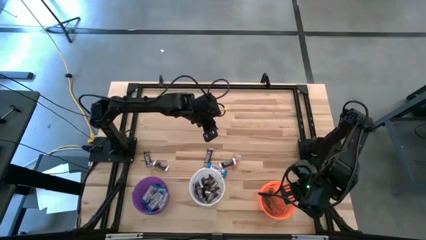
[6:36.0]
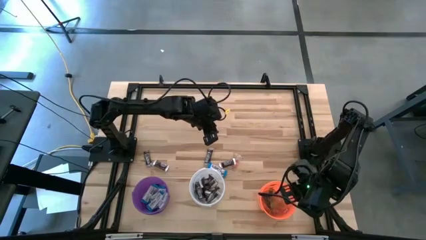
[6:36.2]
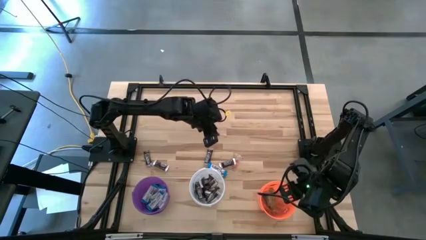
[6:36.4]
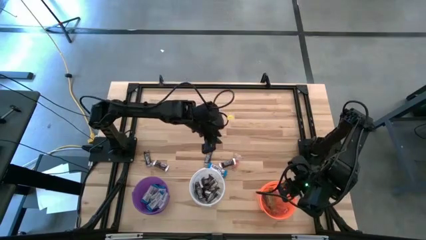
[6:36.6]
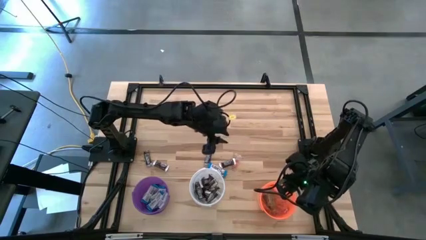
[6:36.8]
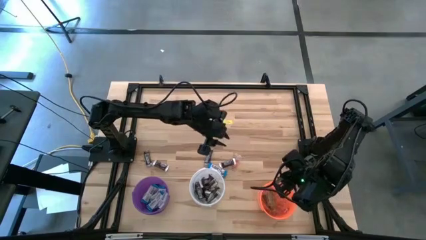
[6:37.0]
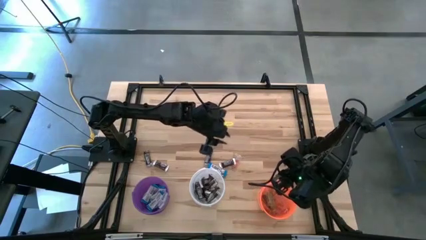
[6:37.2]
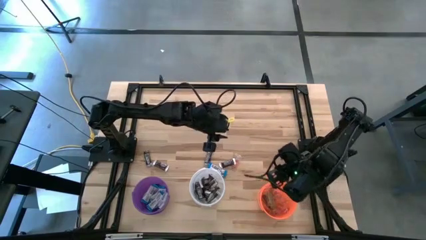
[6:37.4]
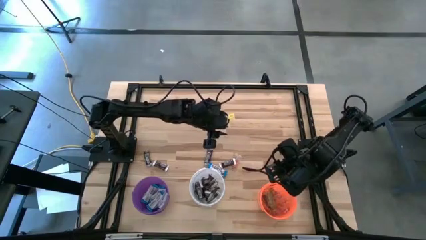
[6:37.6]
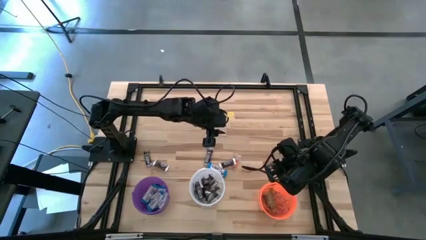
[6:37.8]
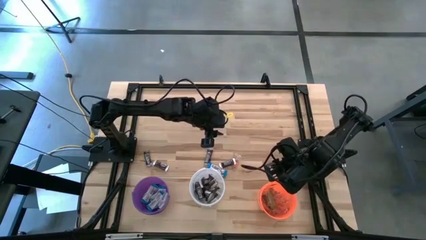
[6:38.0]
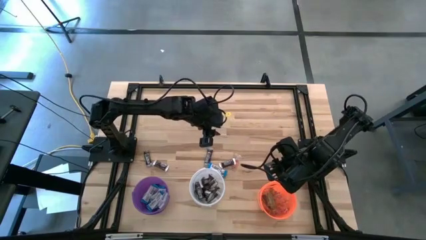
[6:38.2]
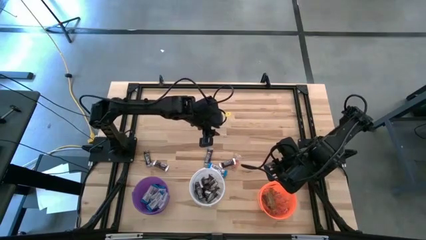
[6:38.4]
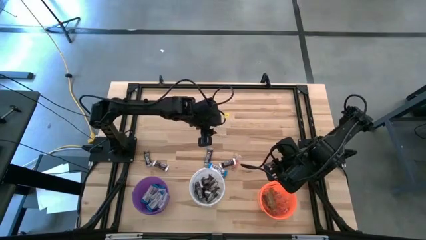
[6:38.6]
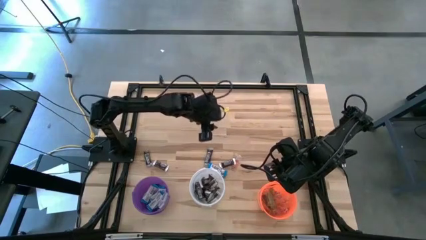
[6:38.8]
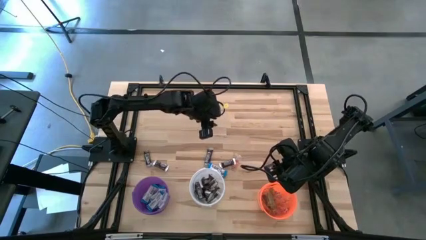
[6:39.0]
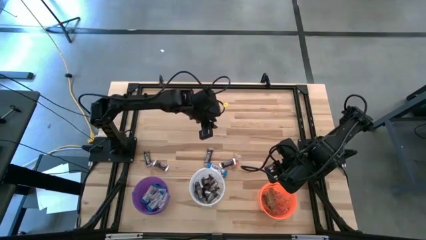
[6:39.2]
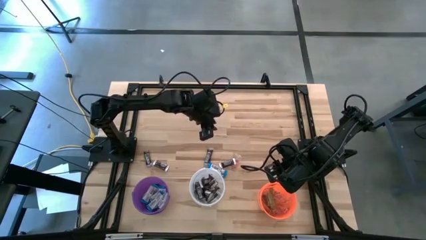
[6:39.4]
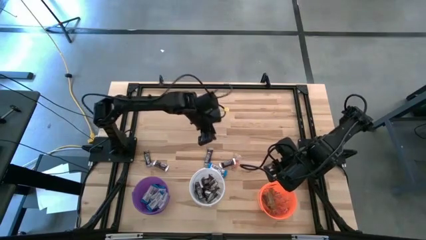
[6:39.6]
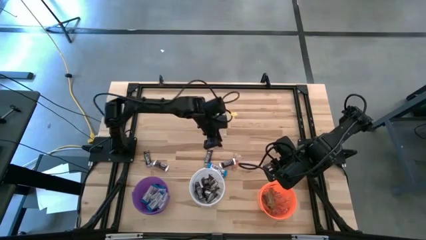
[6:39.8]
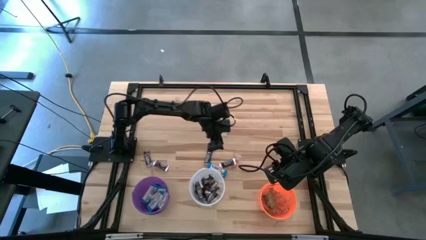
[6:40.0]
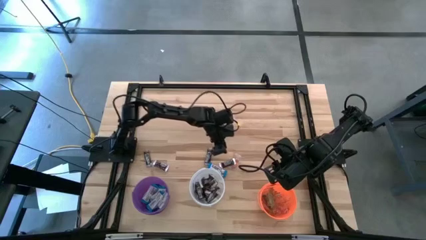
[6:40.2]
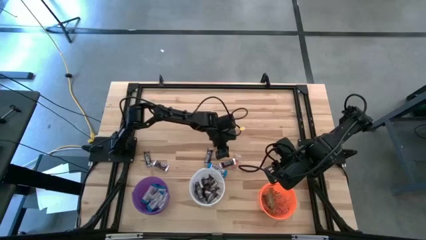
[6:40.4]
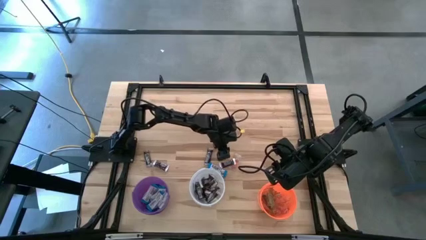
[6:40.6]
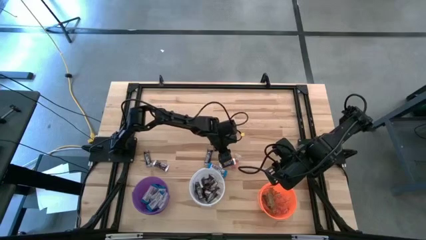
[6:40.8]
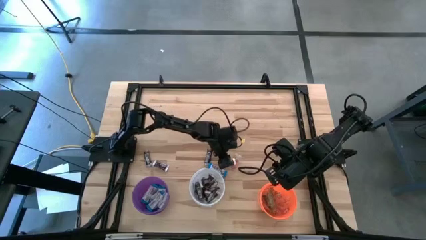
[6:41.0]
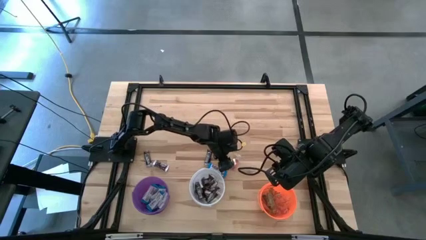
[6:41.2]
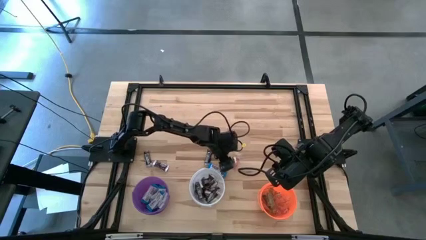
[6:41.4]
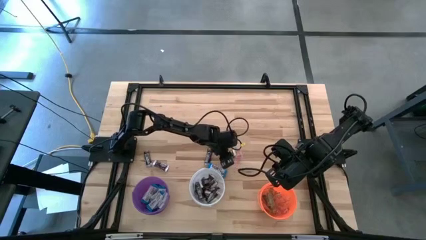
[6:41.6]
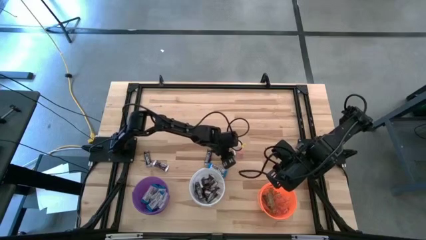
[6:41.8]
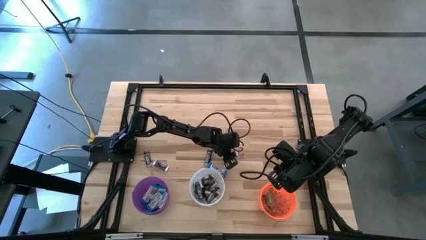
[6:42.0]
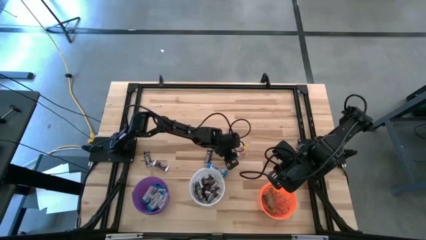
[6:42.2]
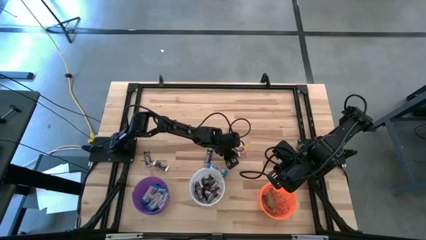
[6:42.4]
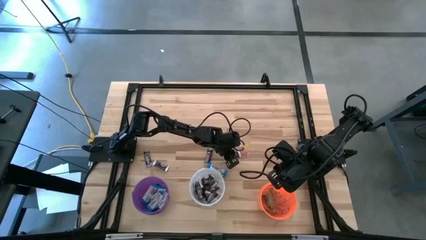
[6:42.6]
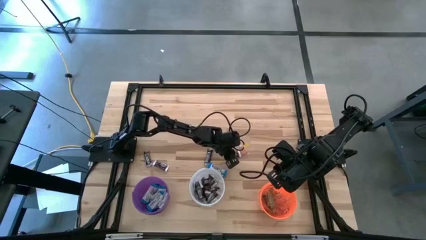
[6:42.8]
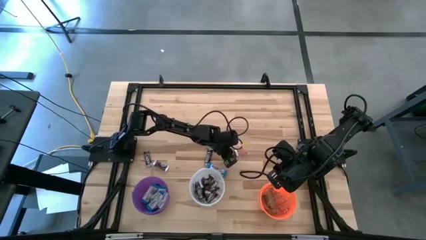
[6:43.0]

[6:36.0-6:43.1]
Task: Sort candy
Put the brown chocolate into the white bucket

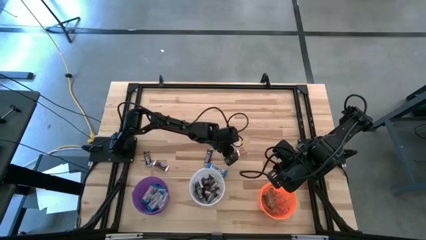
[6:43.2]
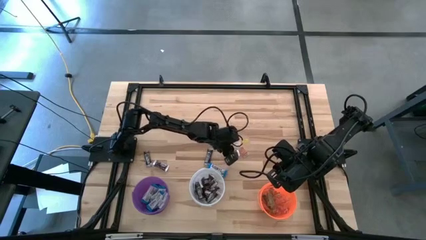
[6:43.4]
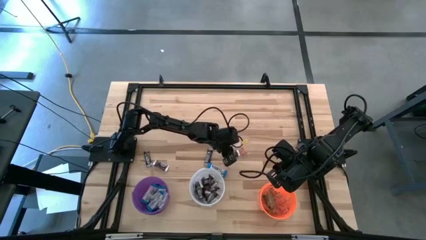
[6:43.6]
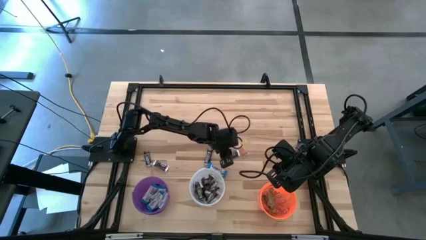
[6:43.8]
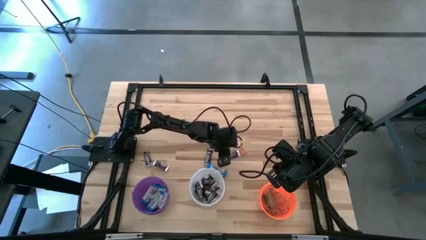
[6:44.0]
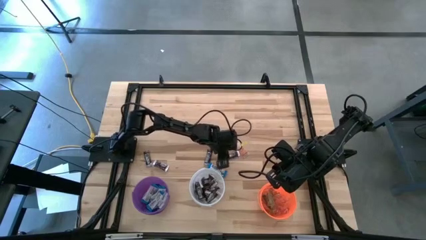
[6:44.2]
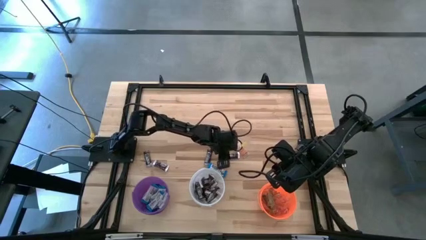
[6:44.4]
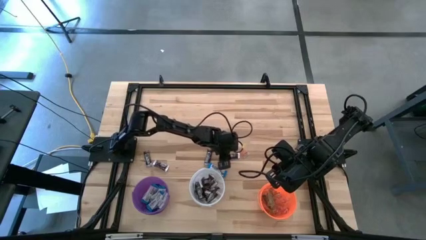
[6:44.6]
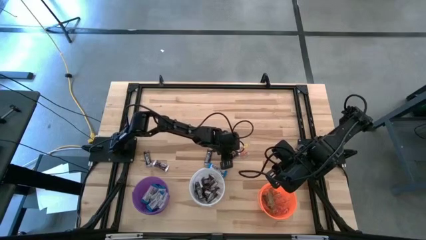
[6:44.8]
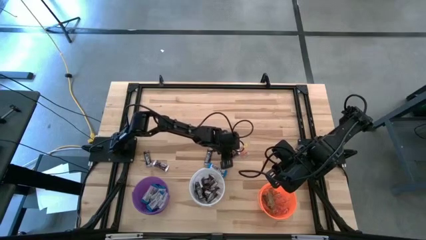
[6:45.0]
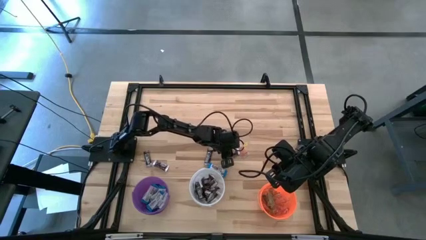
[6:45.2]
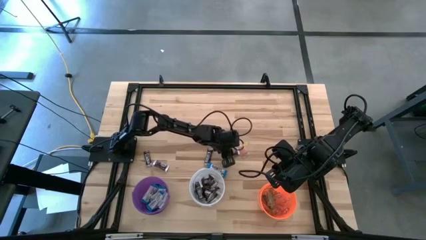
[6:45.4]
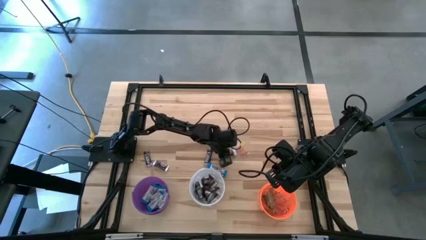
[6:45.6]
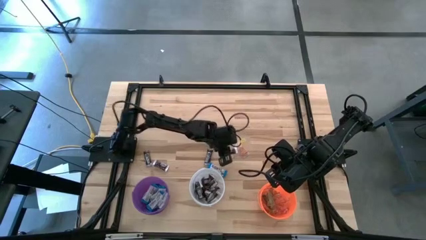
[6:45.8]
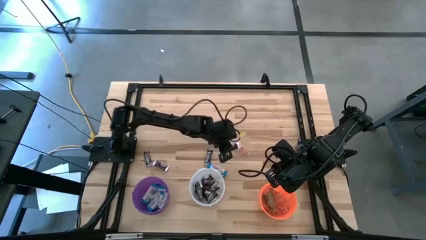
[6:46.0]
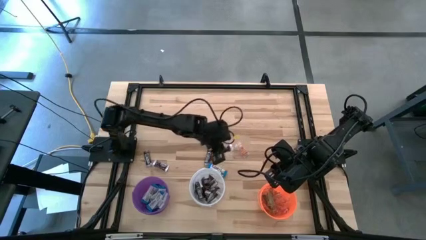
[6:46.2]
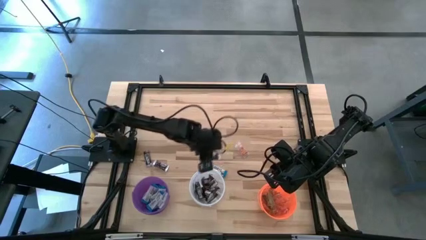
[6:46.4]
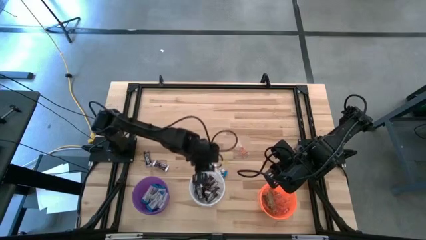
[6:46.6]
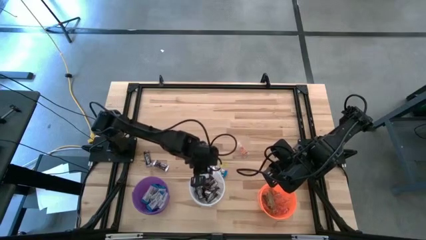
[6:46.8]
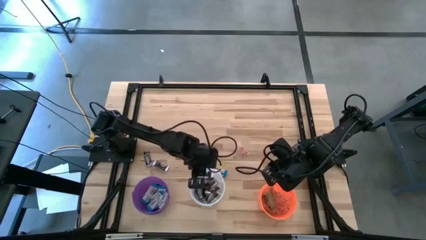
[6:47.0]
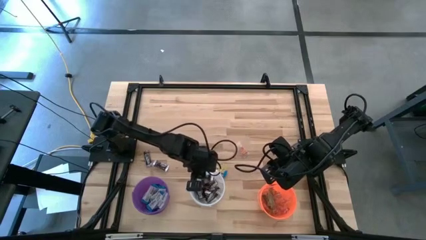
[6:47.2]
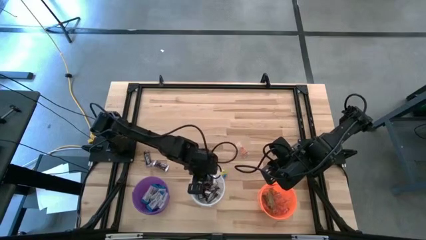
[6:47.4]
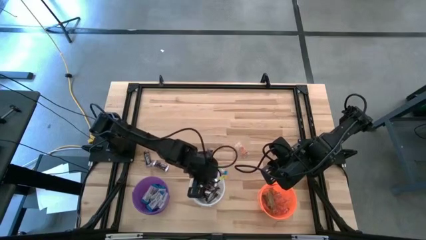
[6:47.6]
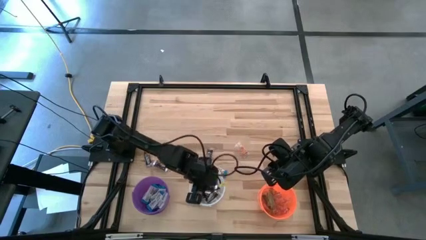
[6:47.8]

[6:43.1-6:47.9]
Put the brown chocolate into the white bucket
